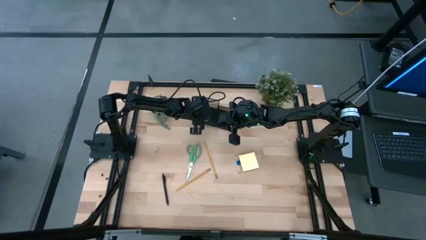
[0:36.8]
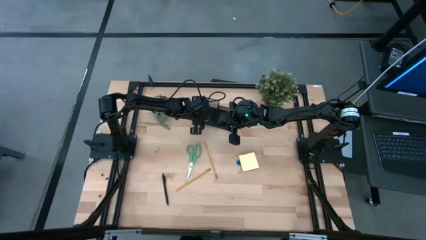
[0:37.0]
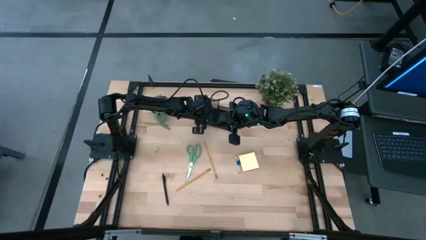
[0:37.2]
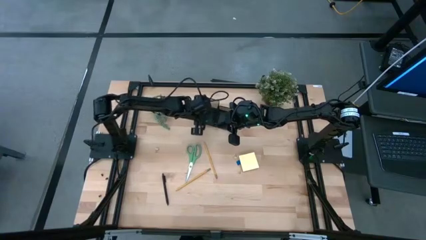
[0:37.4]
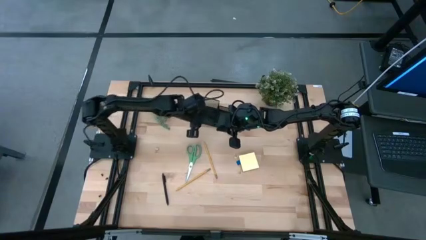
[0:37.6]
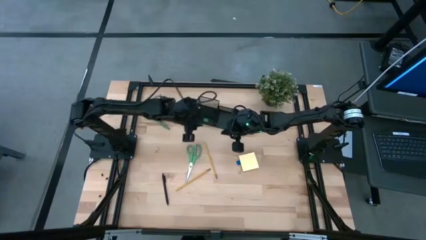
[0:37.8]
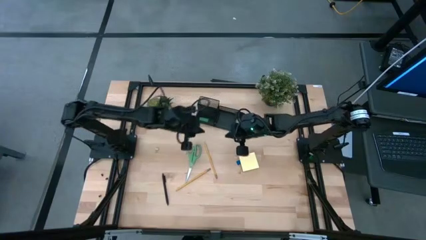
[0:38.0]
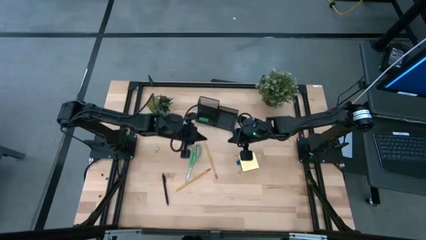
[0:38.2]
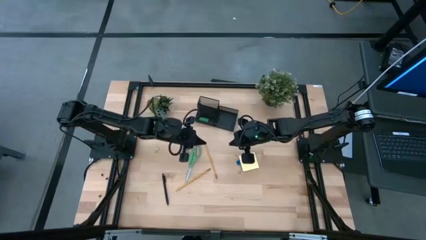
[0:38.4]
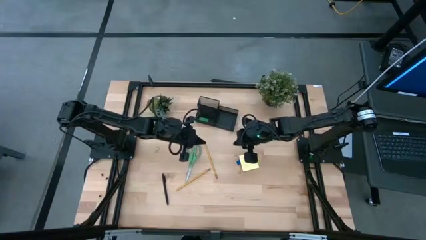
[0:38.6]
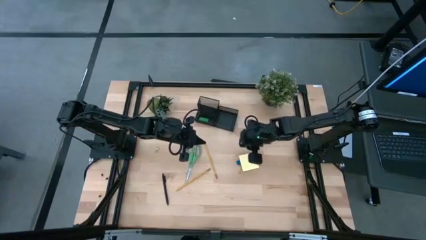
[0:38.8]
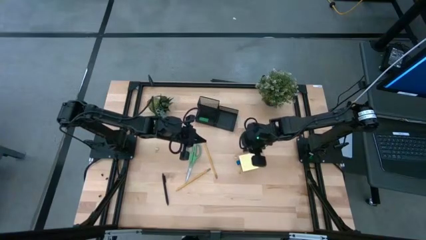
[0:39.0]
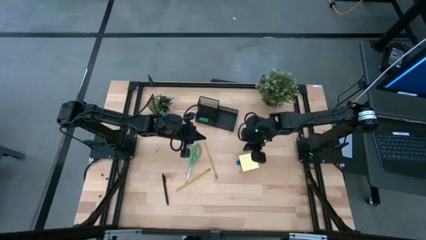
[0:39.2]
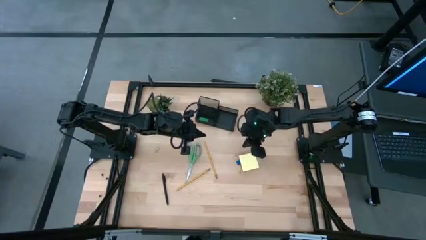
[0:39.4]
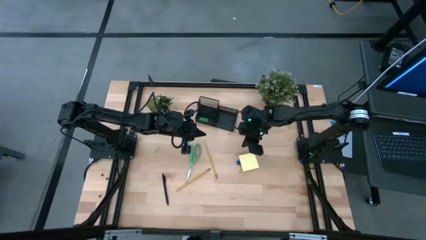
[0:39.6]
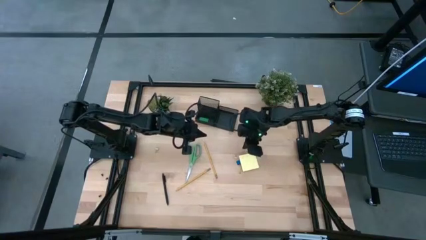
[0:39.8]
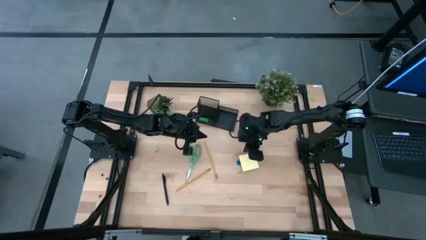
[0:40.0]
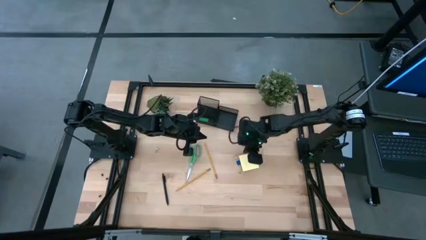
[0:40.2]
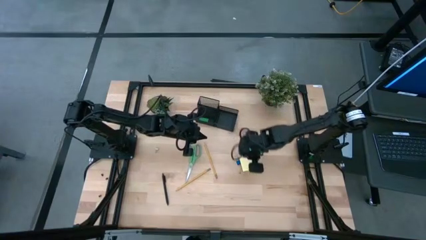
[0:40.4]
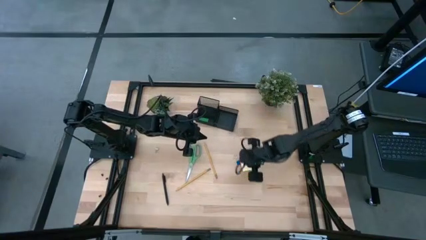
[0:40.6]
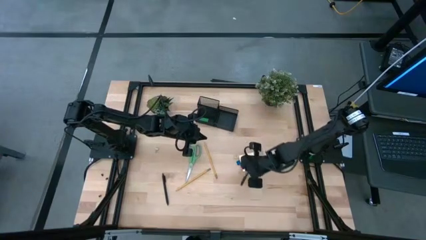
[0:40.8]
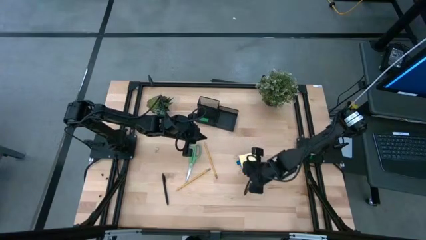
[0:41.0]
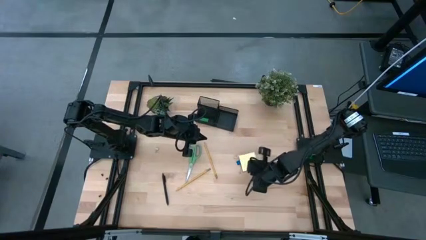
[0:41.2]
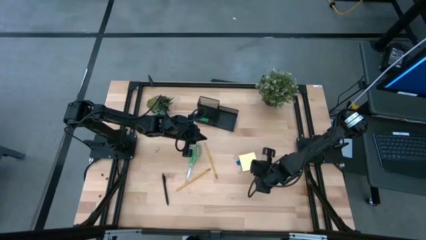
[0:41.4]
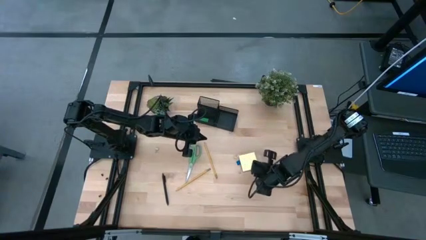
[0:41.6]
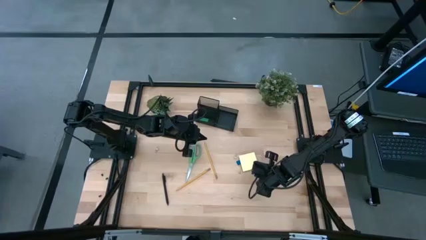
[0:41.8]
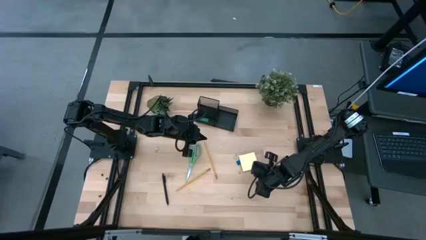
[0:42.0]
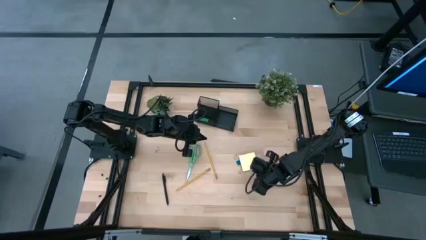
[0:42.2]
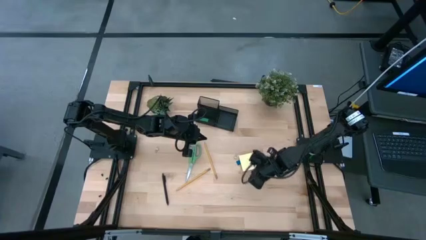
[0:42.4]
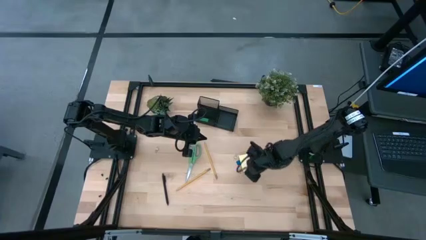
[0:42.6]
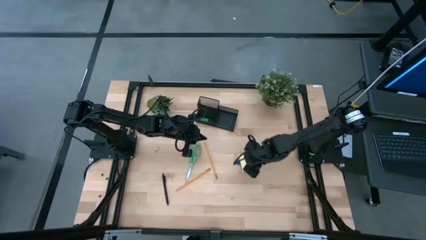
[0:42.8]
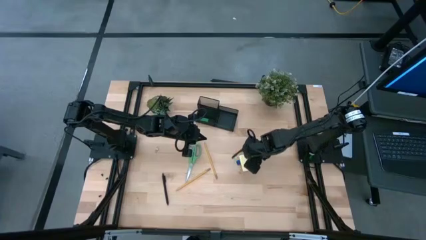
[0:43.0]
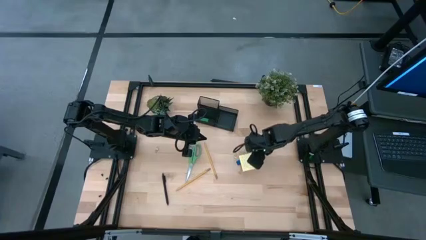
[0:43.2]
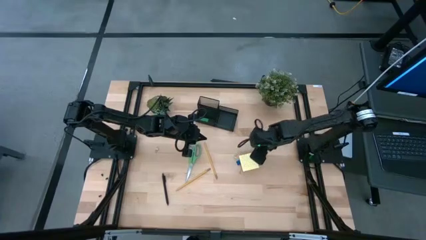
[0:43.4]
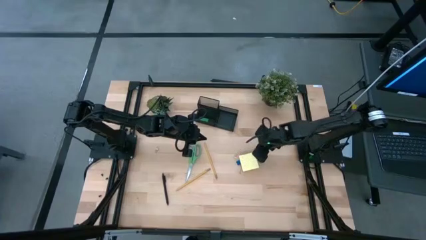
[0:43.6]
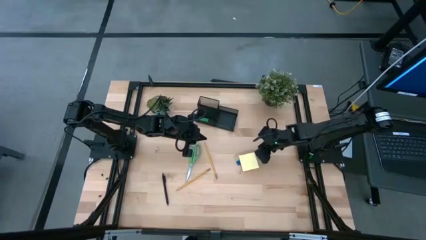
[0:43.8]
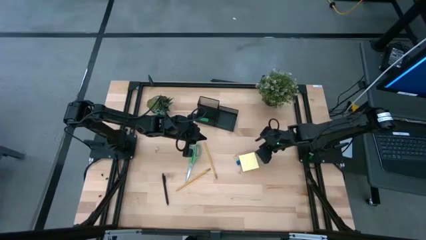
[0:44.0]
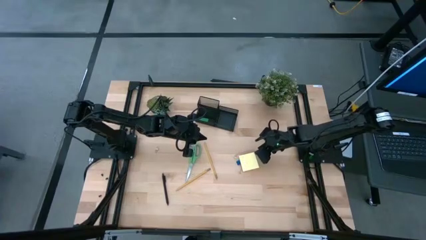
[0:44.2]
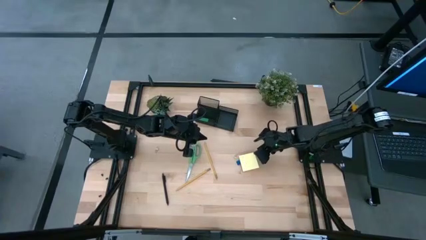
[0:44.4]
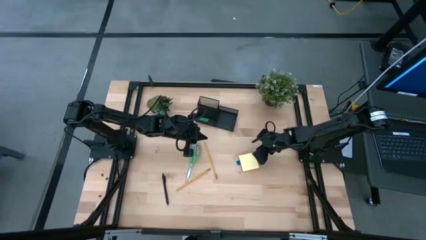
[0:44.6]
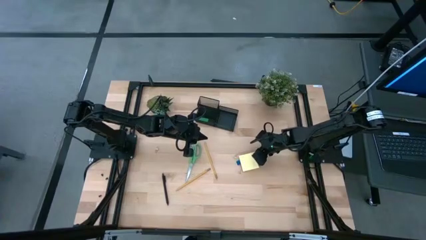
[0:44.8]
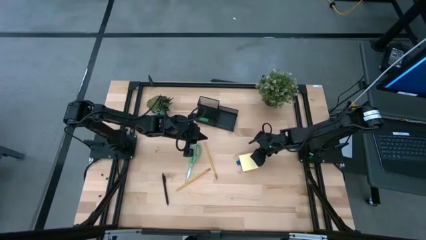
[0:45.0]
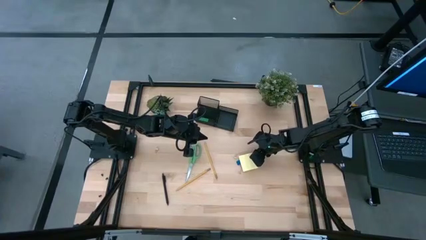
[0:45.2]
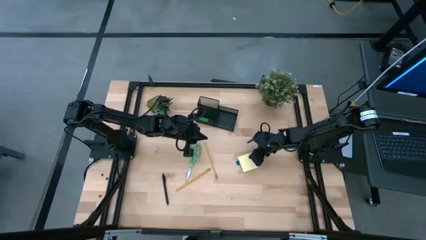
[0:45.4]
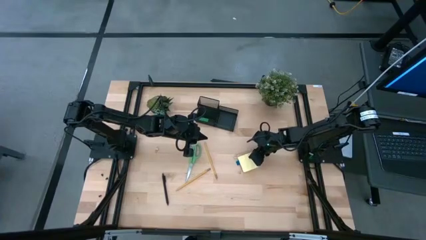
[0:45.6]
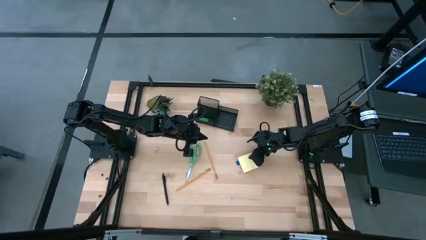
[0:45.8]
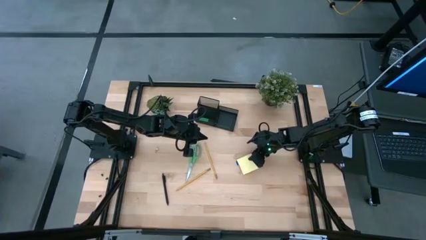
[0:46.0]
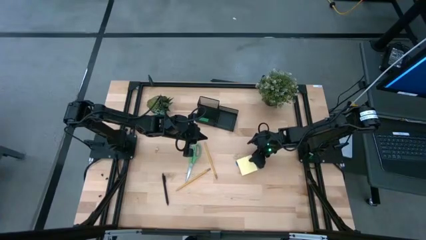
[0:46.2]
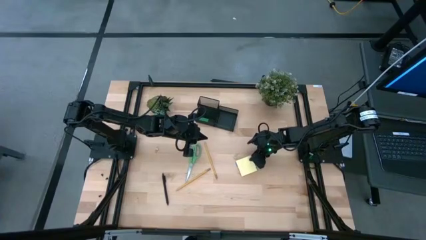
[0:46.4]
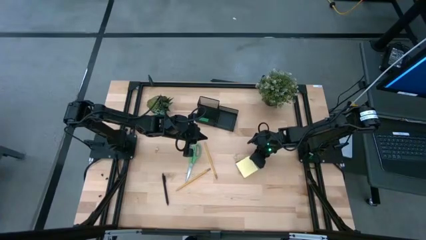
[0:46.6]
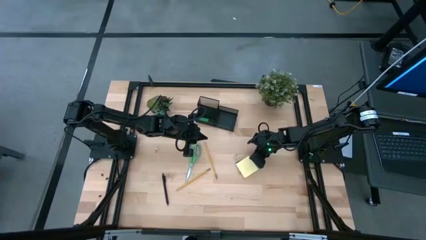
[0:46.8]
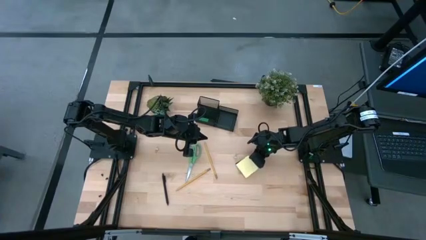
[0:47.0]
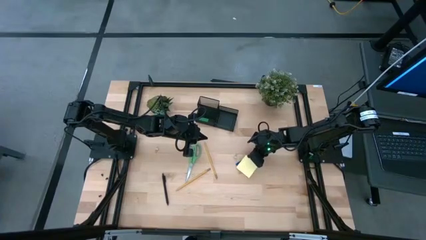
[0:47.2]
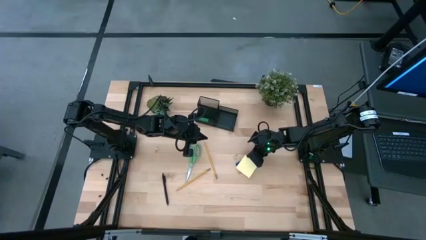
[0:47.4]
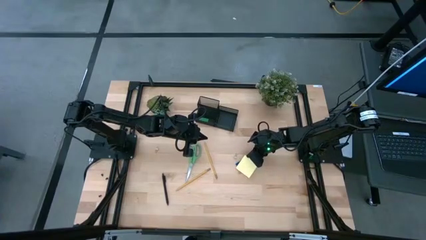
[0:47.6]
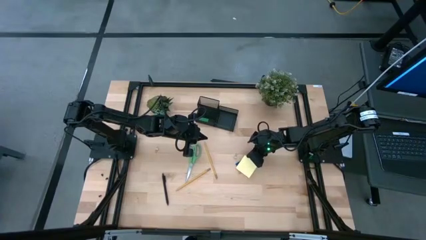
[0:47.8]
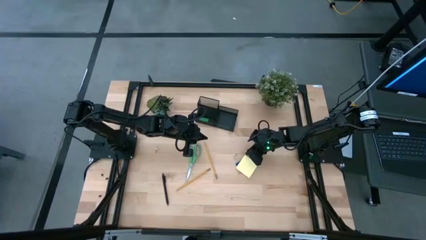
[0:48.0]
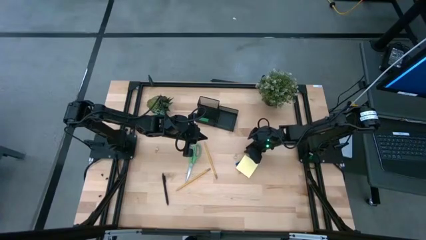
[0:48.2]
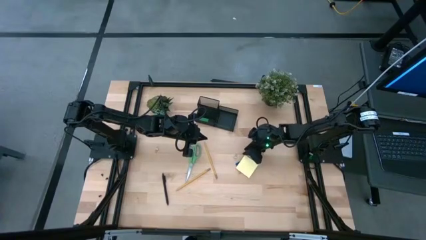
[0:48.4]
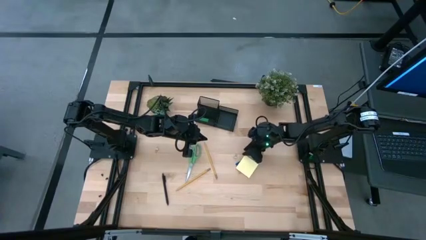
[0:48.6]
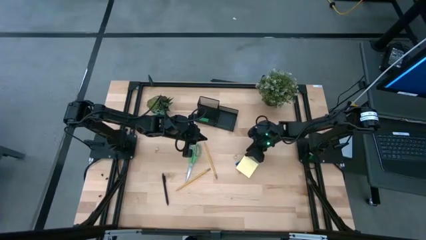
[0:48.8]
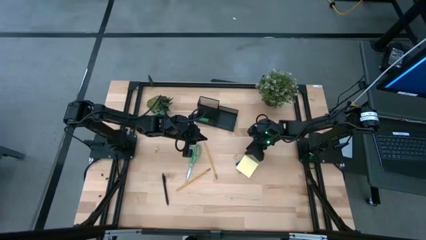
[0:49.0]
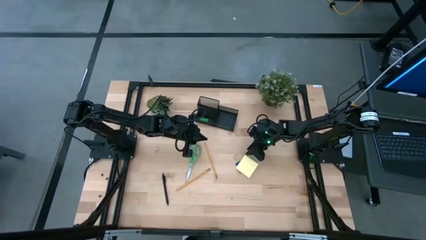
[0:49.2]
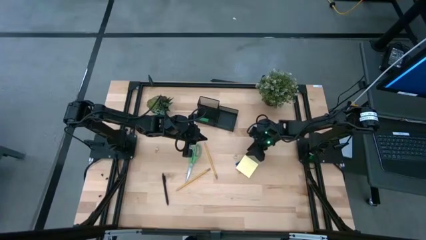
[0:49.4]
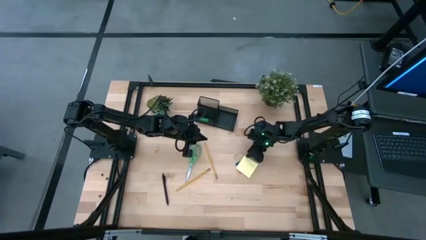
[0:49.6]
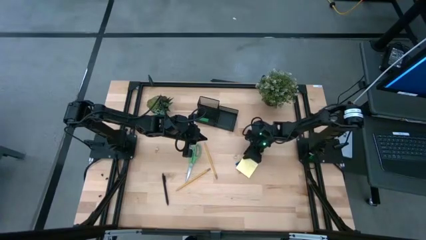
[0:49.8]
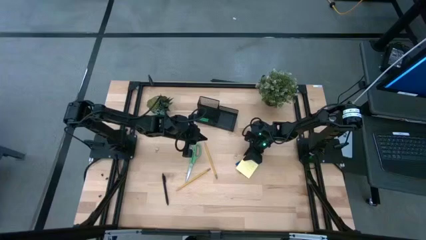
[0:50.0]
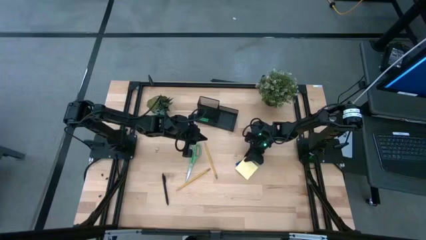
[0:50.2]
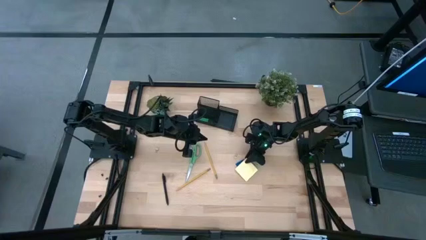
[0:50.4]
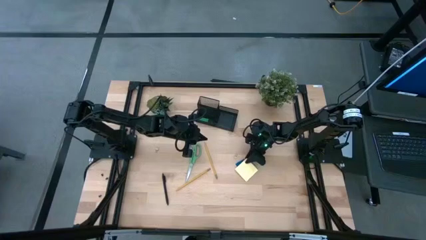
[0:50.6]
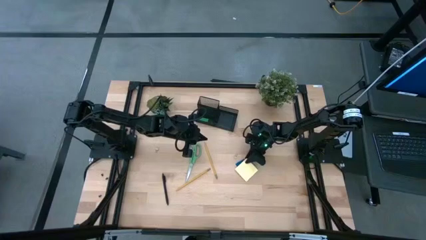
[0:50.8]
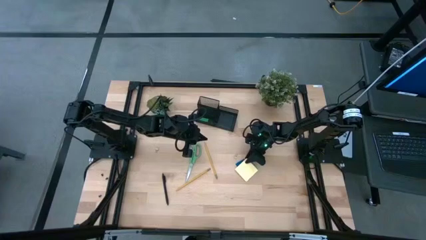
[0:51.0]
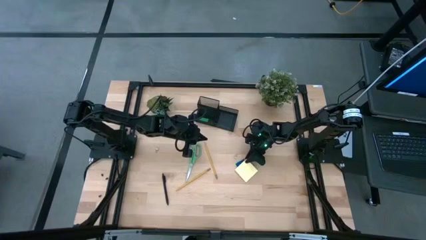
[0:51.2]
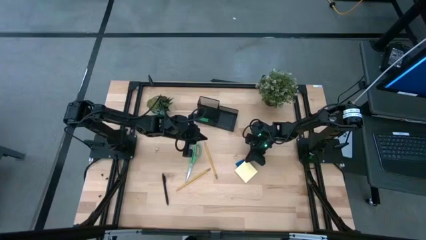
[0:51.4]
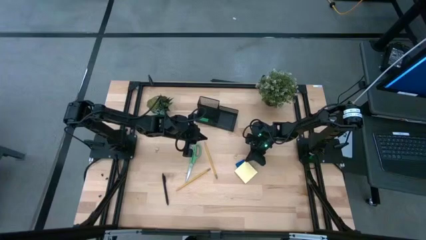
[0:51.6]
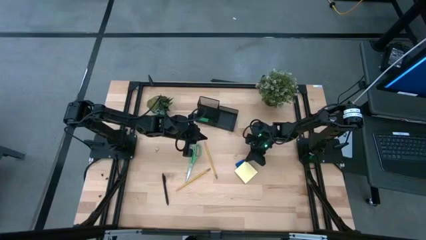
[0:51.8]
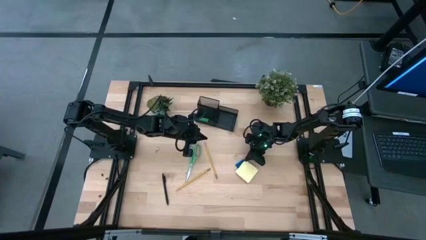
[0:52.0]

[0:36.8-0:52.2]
Task: Pick and place office supplies into organizer
Put the sticky notes into the desk organizer

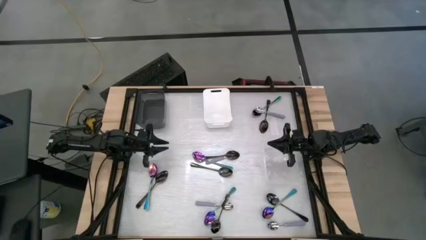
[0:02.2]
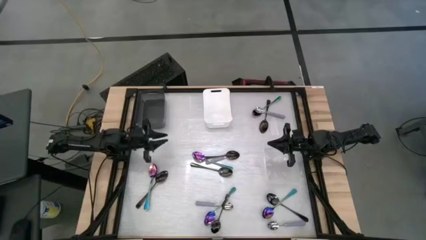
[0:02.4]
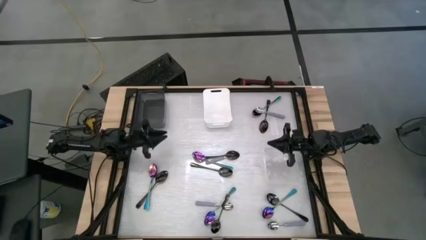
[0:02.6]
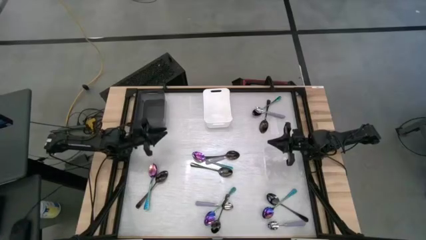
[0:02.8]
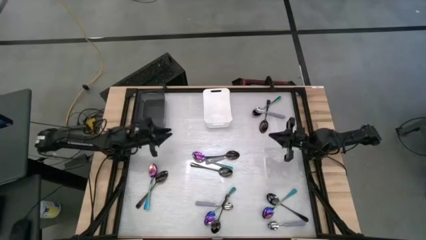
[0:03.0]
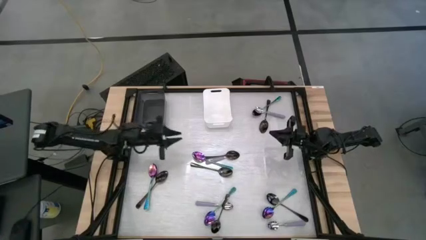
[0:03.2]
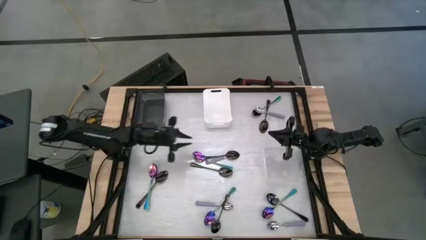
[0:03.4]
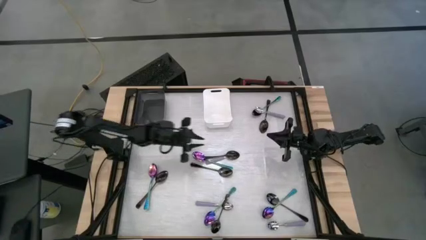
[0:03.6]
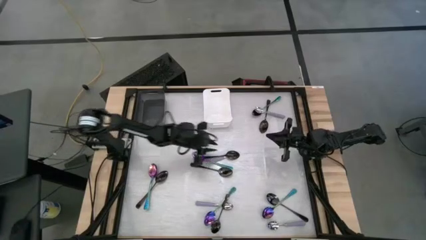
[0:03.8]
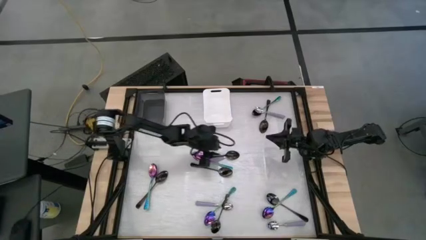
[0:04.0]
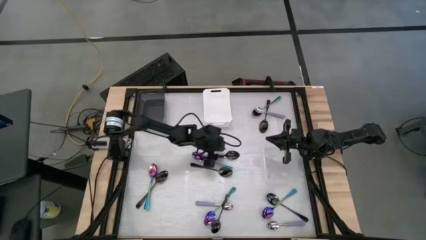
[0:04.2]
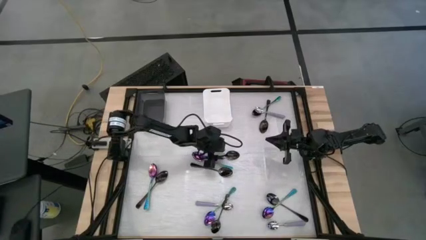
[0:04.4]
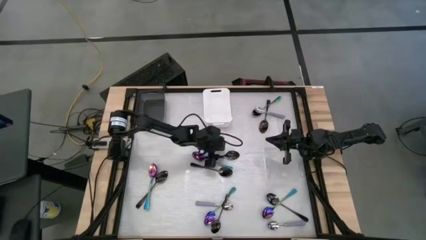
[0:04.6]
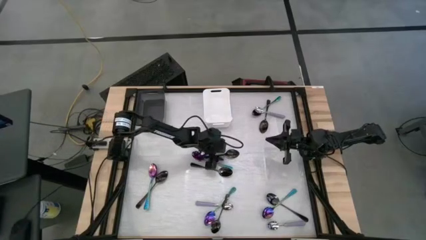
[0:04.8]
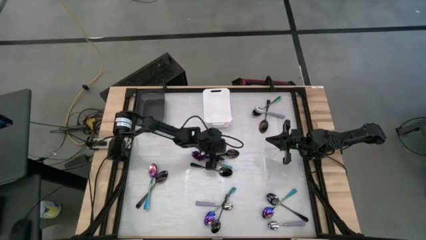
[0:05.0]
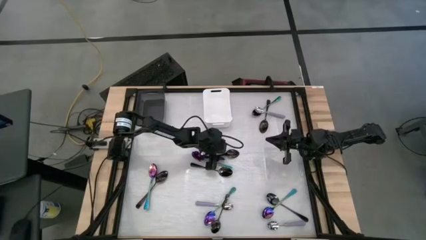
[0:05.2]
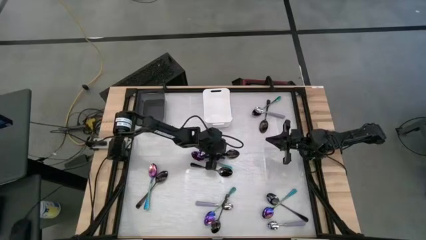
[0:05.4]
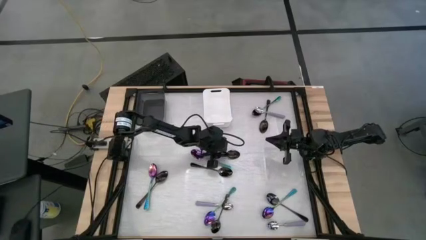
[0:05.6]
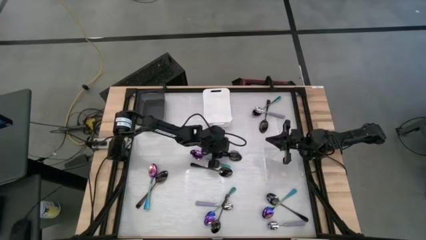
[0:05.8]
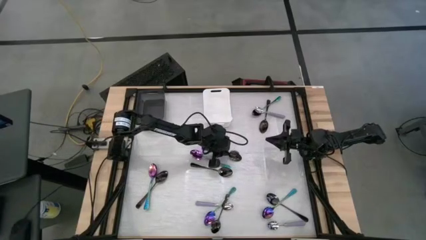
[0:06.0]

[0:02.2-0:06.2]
Task: Sort silverware by color (type)
Put the black spoon into the white bin
